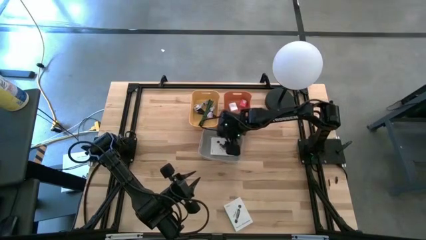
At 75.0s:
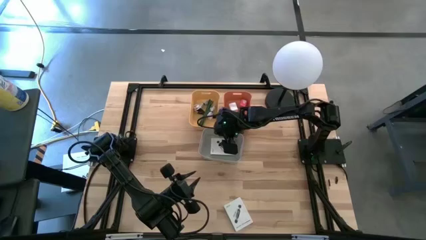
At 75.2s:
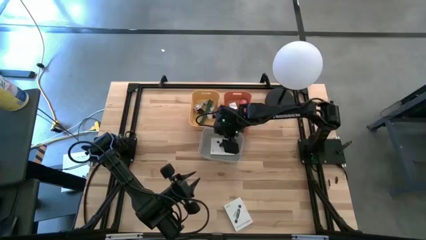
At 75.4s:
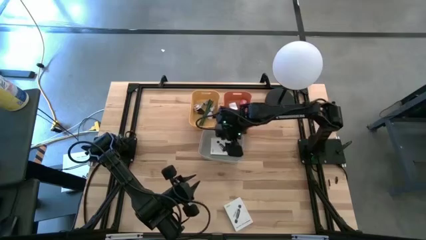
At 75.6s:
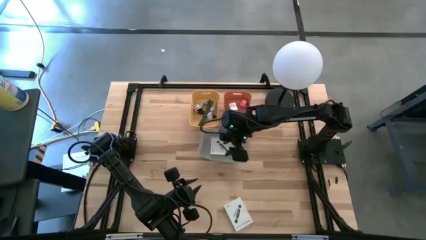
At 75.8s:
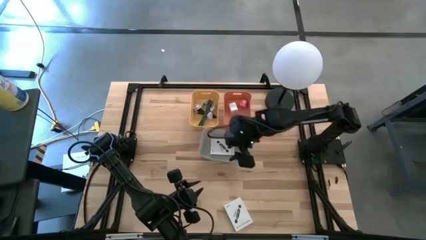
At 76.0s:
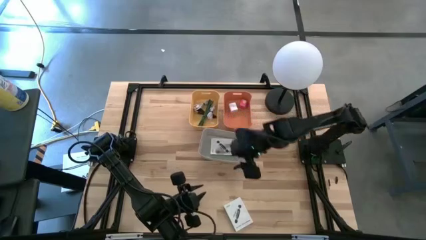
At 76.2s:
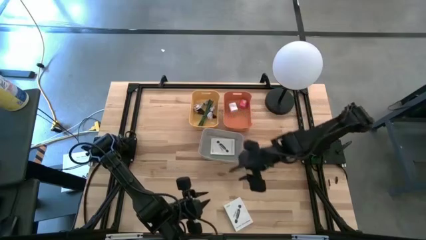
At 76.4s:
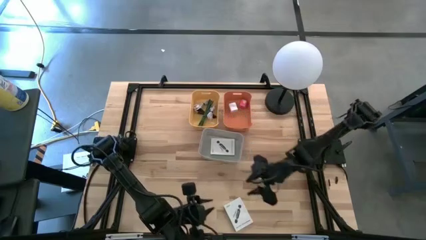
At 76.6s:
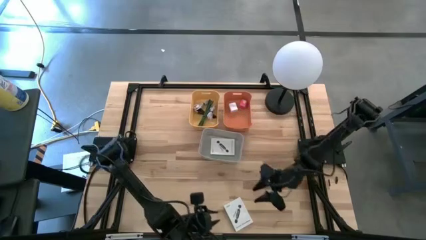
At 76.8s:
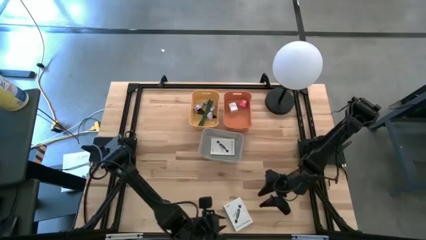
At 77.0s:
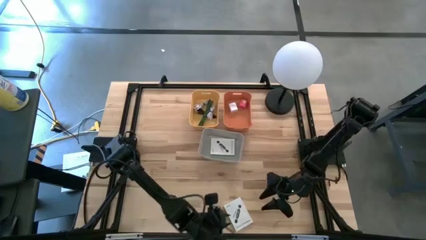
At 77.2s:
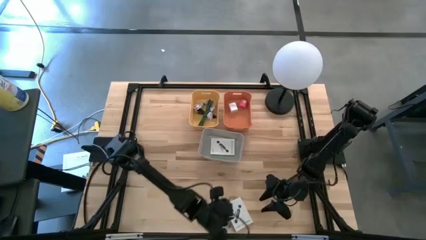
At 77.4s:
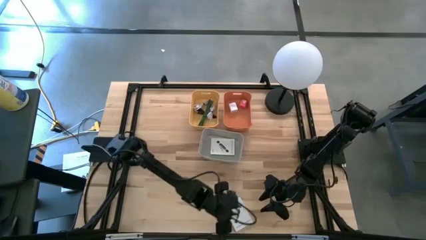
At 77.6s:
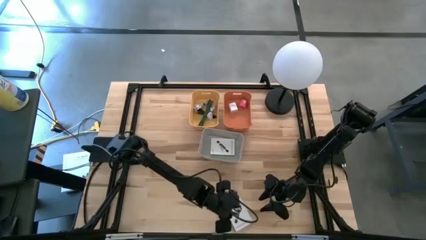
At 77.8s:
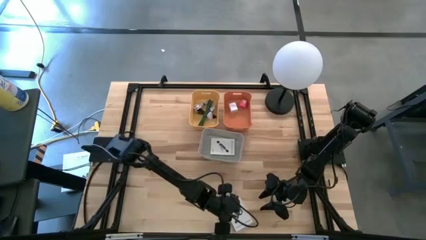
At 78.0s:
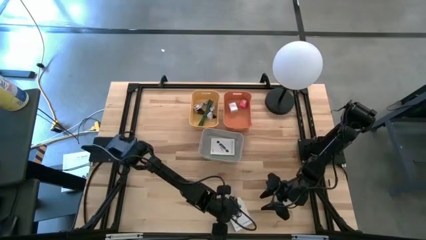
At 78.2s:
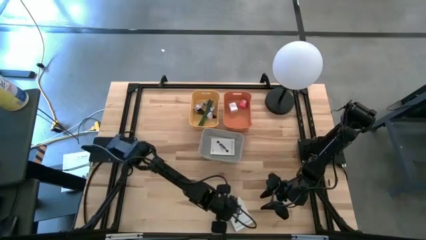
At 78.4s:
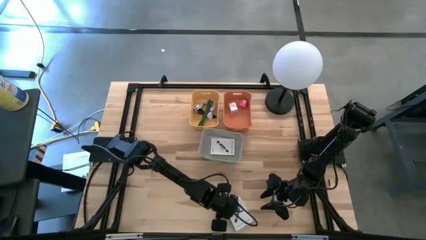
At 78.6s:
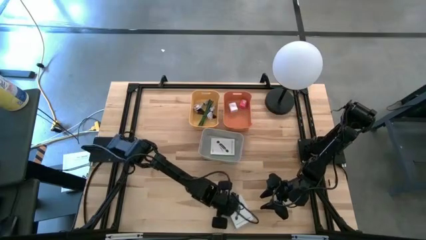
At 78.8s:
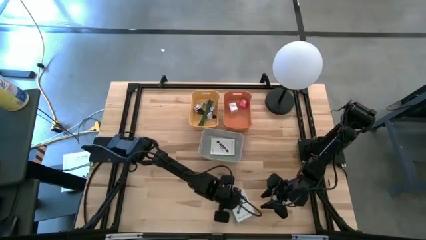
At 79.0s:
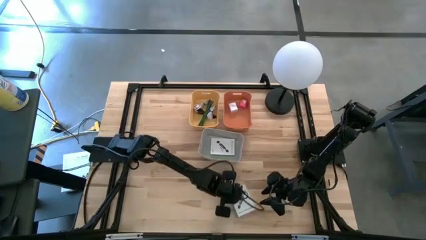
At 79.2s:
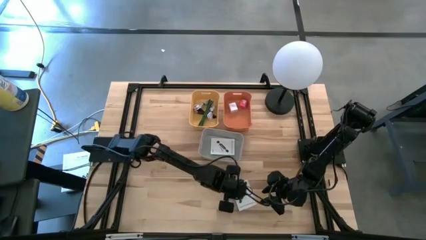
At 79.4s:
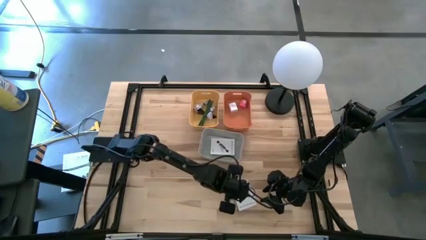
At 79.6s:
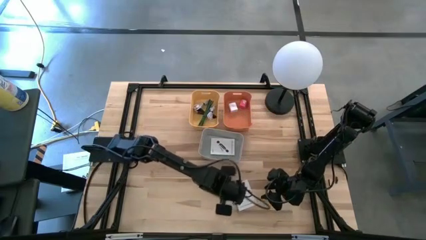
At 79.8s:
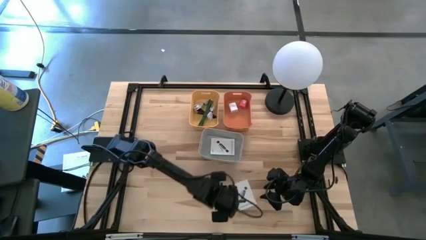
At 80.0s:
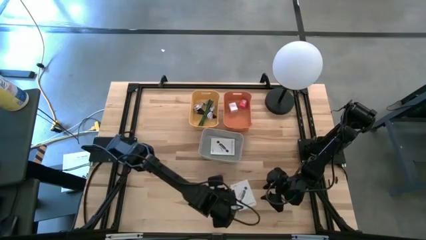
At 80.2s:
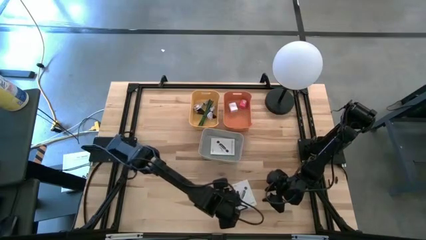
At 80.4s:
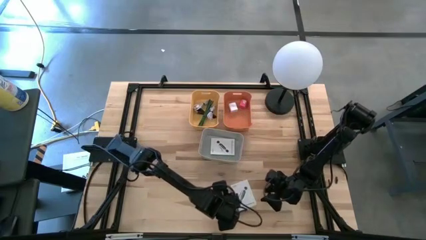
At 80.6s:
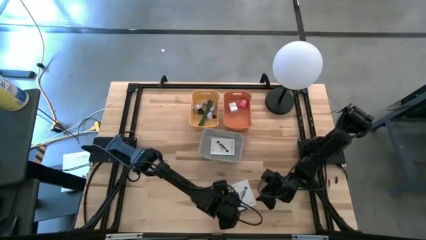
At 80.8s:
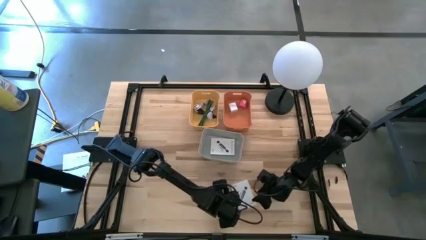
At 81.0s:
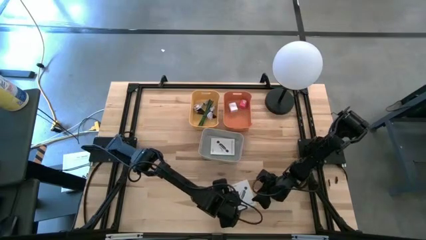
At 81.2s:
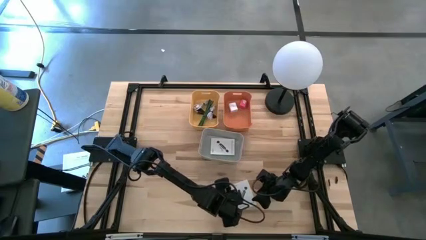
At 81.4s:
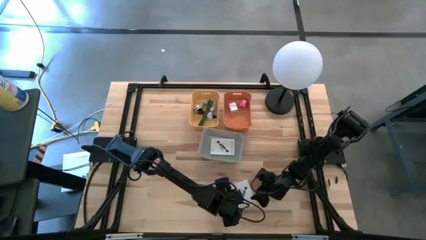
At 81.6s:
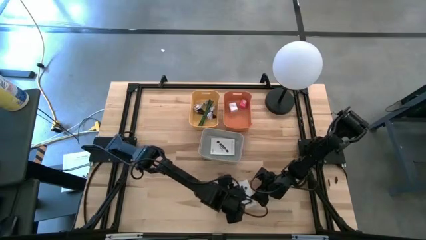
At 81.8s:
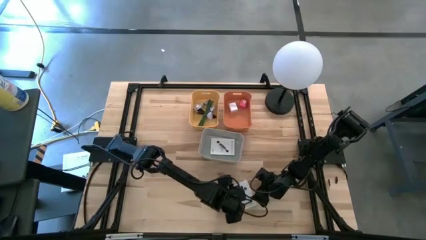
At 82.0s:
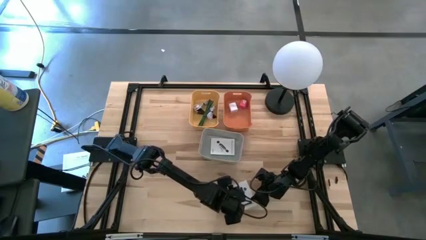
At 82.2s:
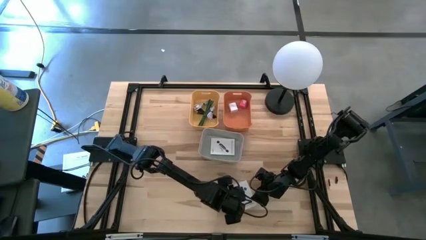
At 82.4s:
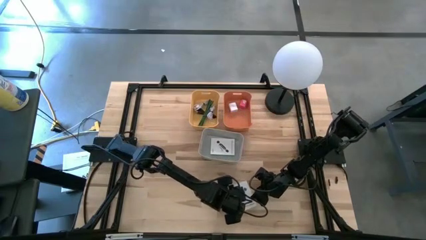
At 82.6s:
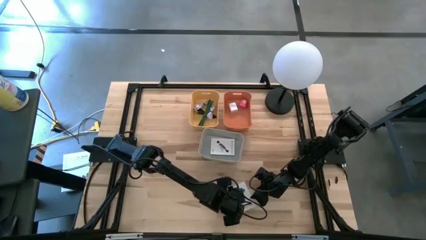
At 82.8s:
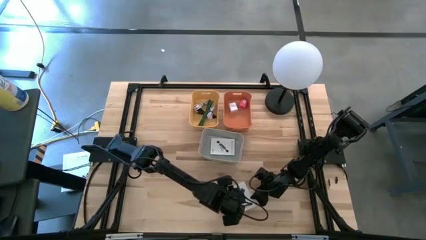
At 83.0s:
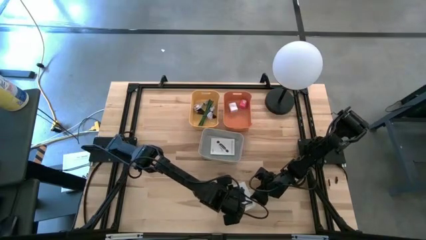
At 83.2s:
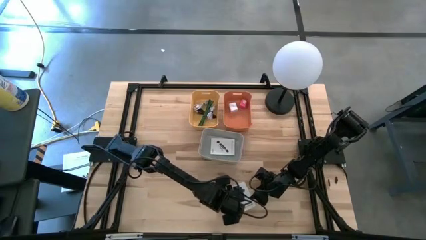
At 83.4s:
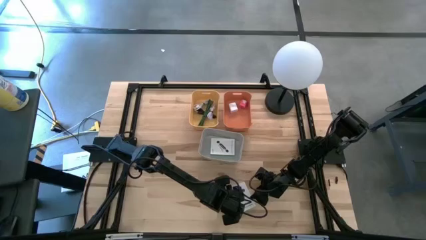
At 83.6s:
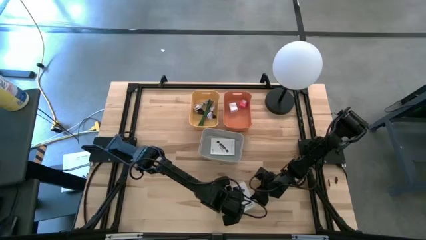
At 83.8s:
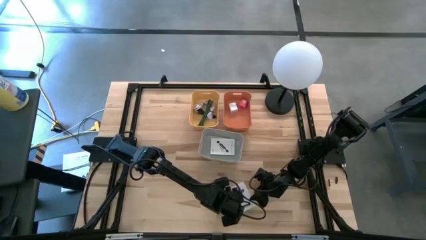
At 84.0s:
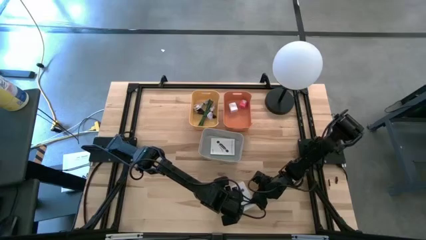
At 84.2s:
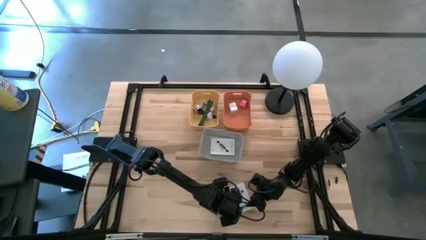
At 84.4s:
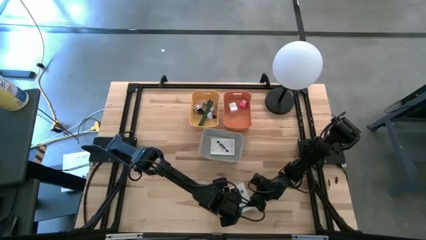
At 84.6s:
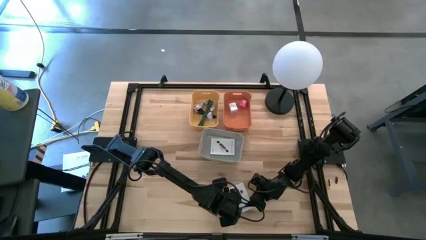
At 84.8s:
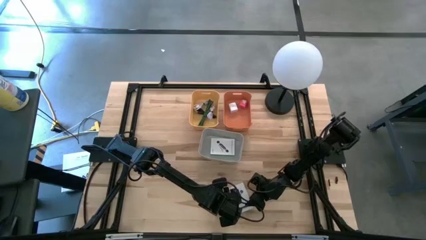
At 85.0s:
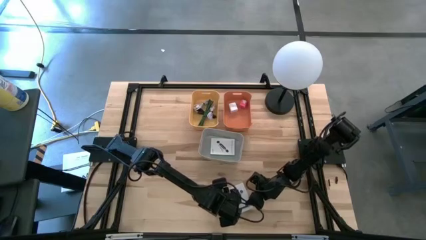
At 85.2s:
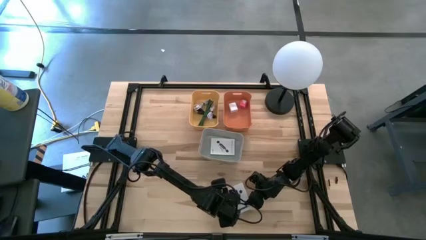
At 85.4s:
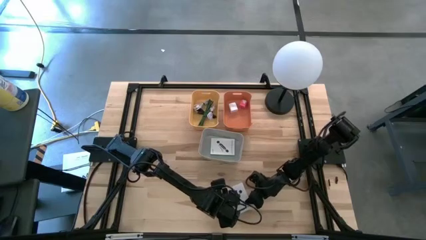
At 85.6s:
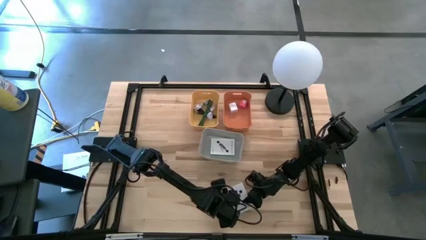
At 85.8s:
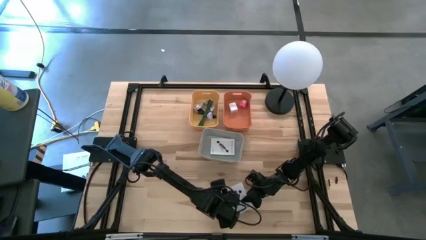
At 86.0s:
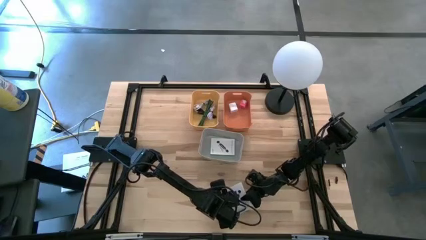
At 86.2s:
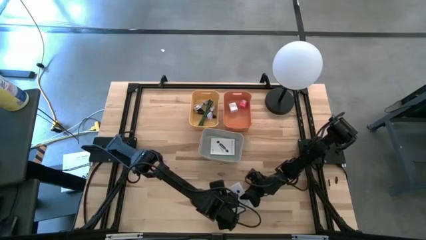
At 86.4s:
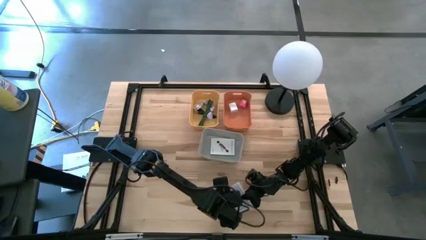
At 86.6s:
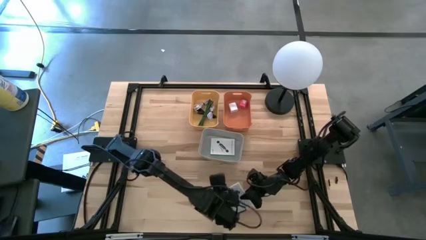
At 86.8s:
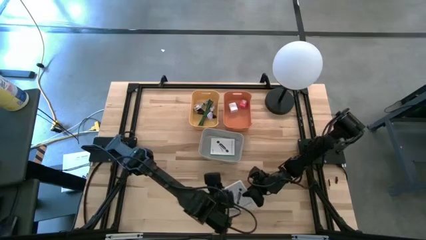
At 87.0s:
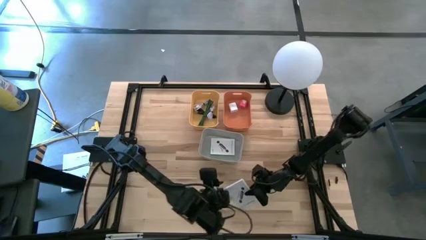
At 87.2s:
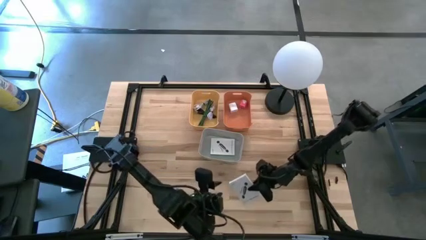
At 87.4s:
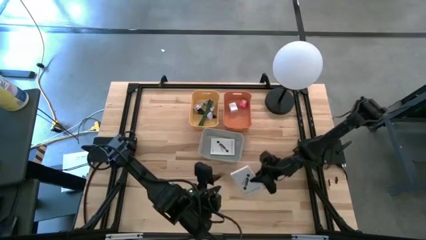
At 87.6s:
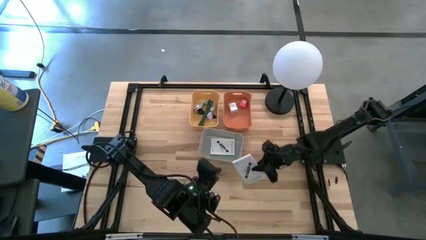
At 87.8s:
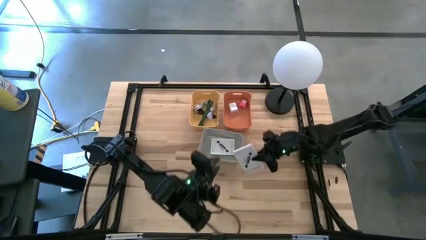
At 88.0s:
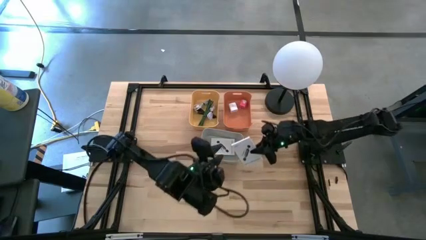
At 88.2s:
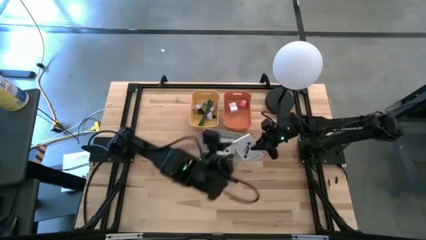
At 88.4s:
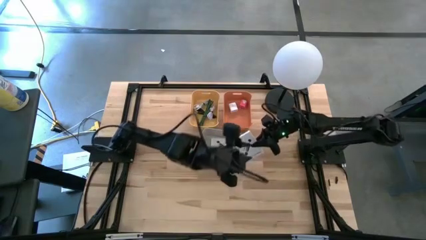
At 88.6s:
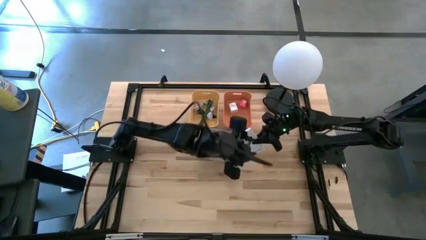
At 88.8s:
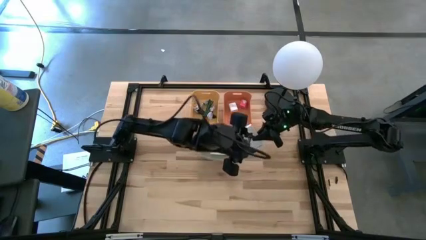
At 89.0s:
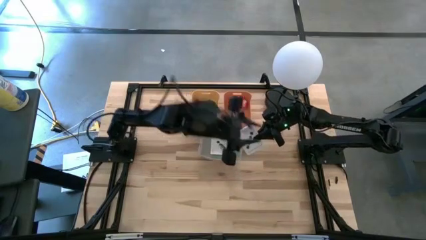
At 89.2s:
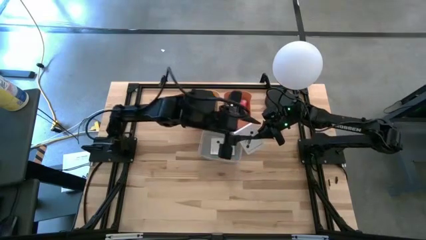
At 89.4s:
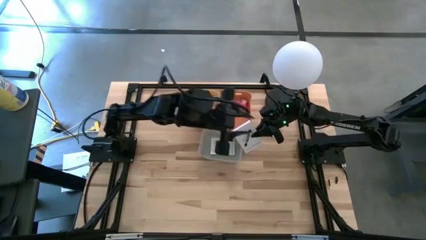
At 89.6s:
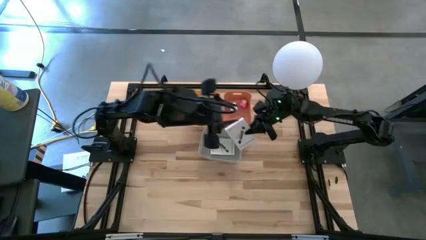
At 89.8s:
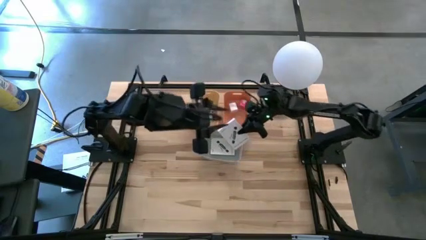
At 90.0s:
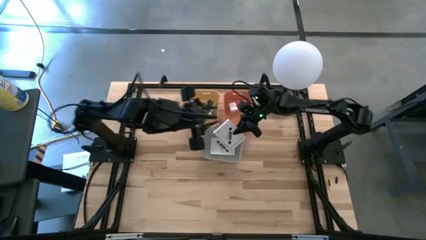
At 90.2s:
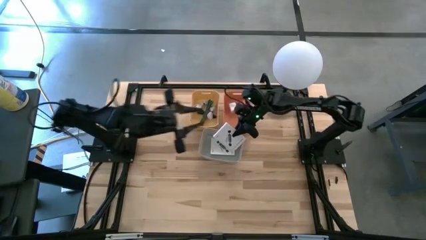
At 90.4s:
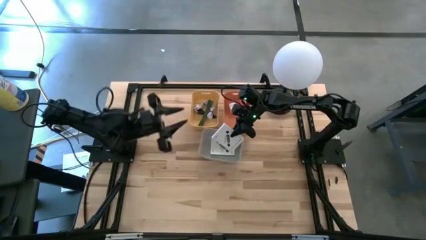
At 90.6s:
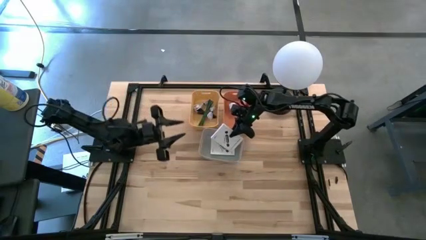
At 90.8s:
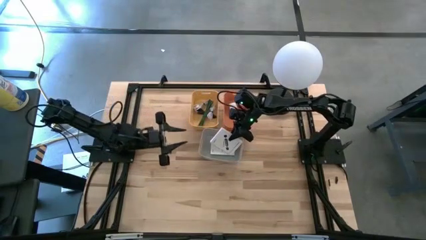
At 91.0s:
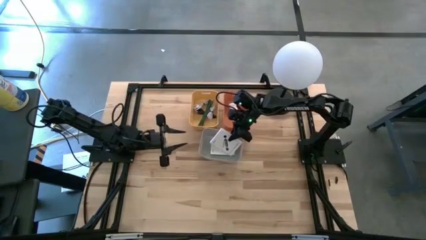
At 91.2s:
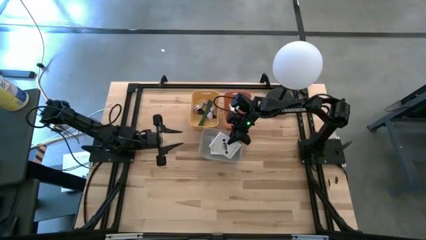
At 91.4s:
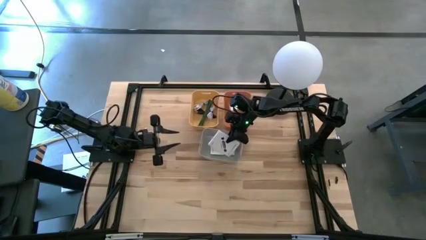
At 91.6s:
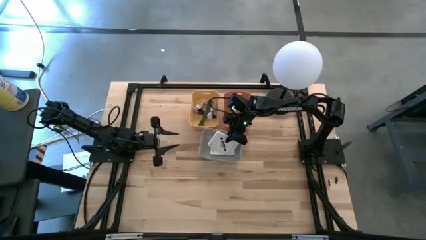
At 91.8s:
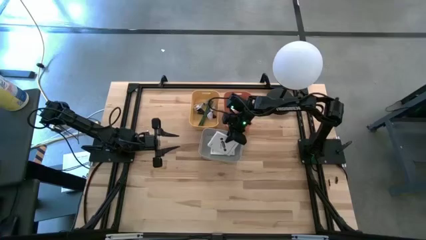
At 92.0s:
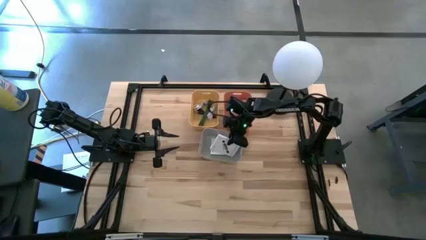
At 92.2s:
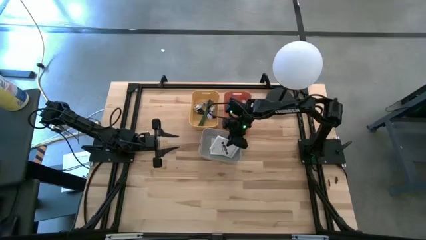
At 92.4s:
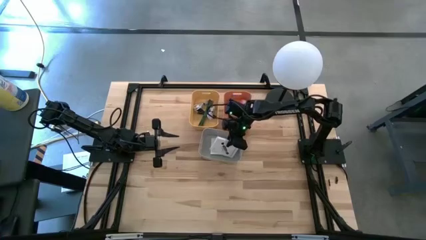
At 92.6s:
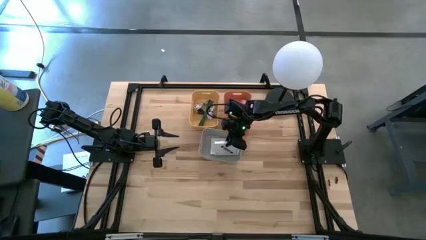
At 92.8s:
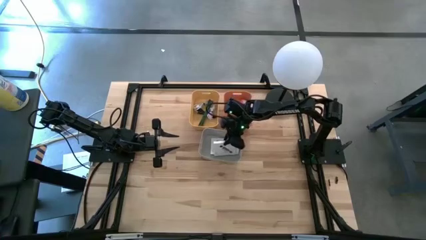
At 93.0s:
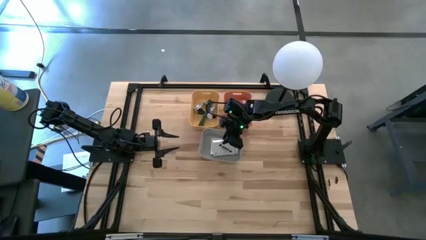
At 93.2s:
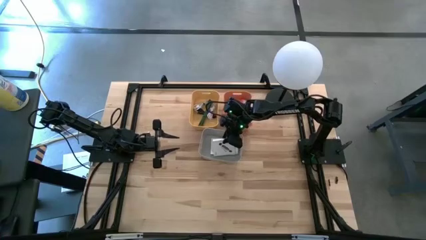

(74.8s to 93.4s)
Task: Pick and place items into bin
Put the card reader box into the gray bin
